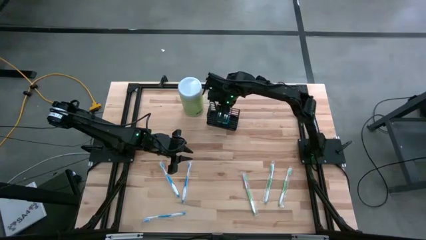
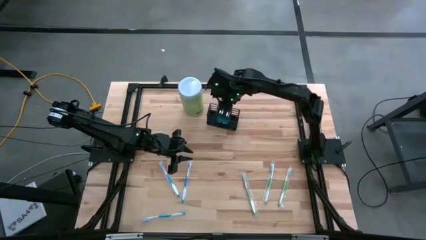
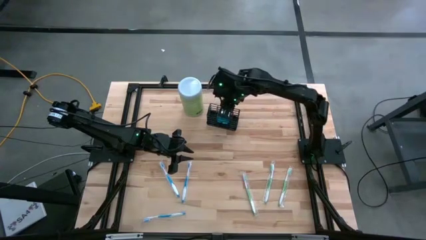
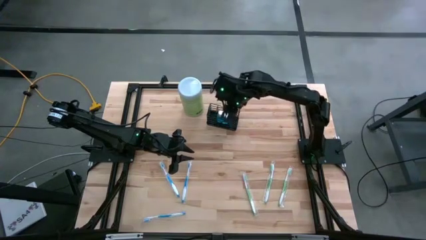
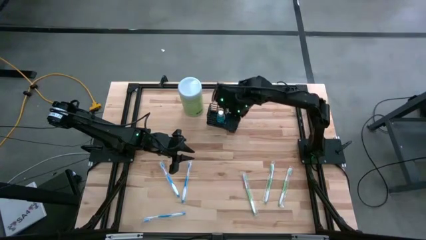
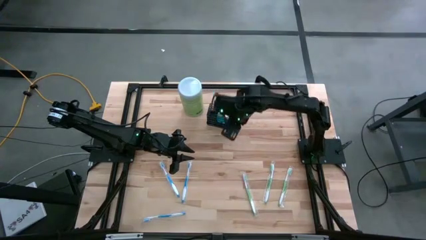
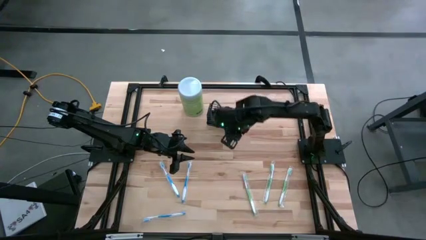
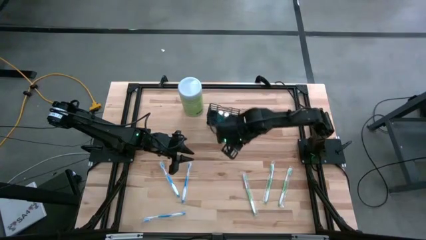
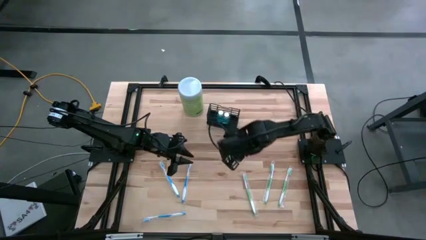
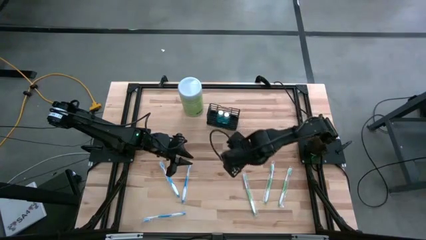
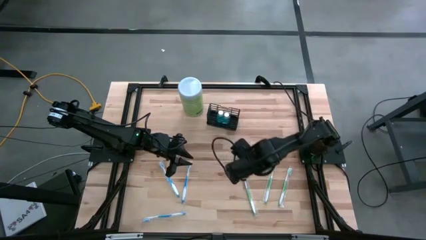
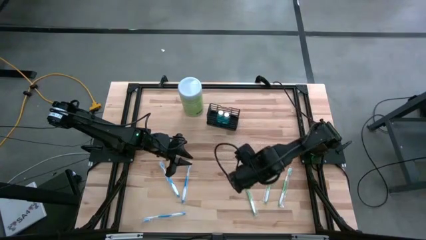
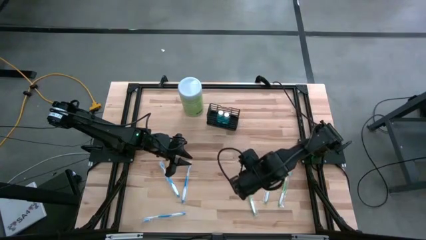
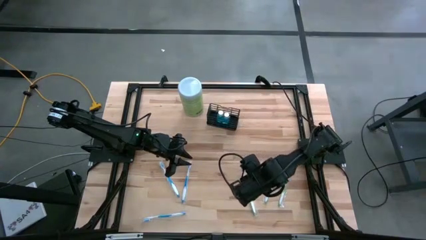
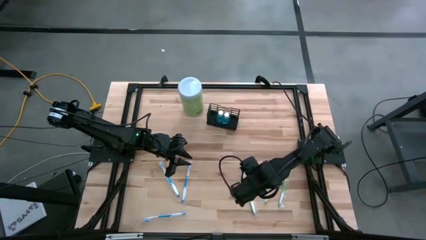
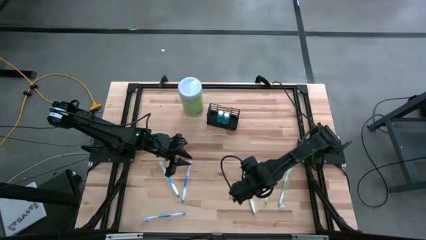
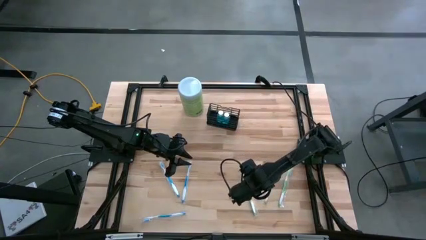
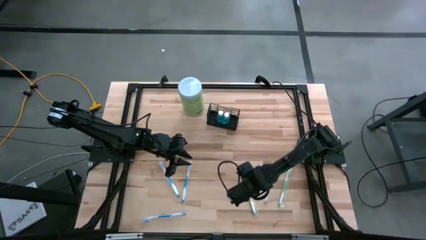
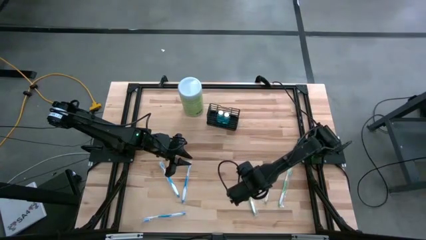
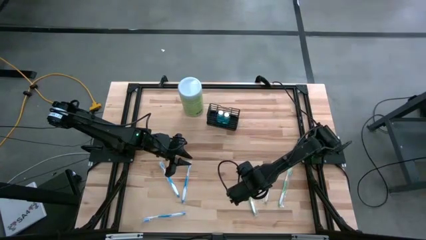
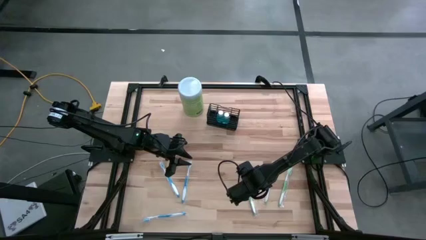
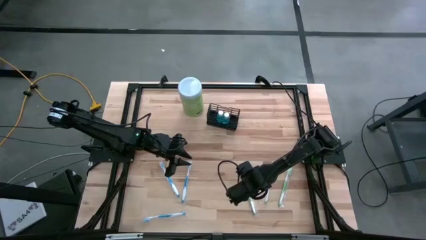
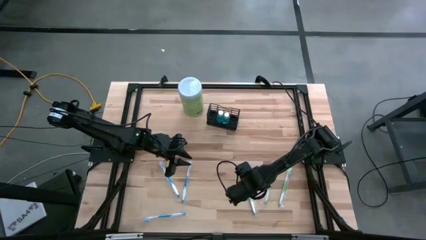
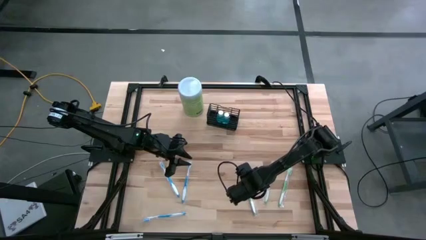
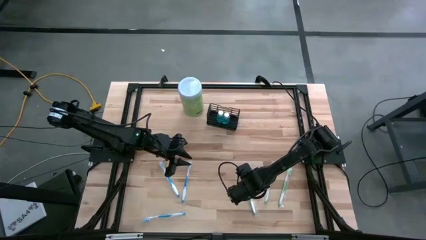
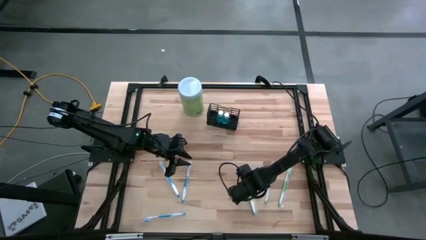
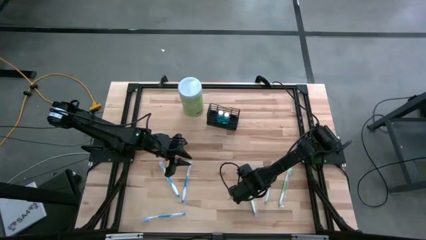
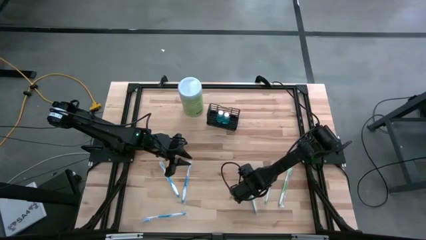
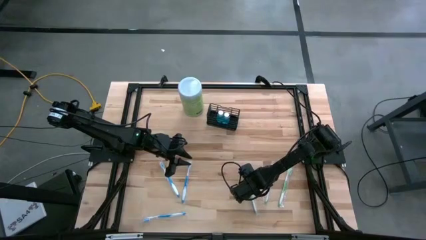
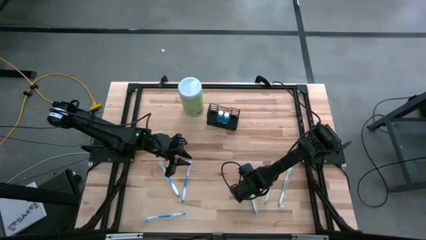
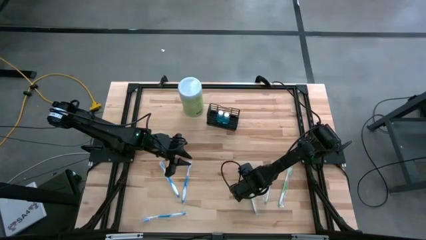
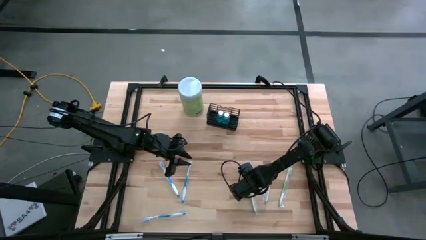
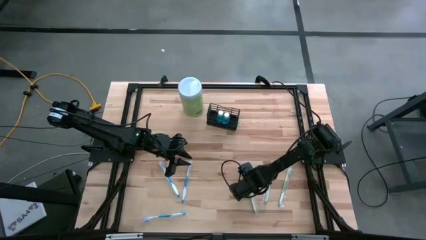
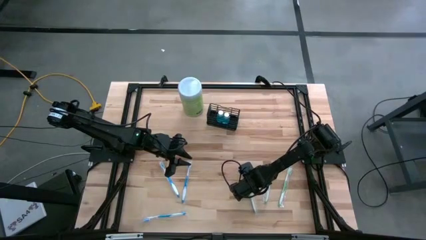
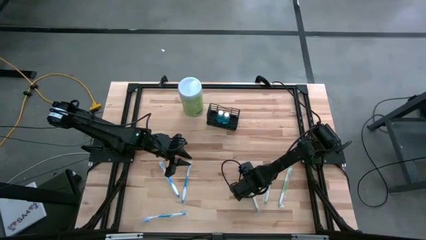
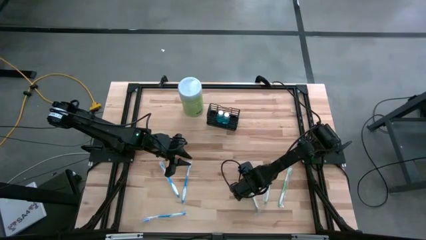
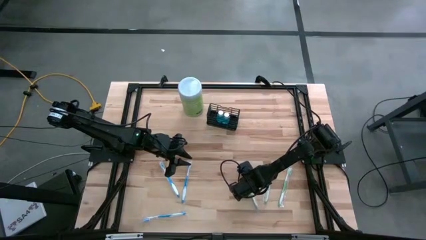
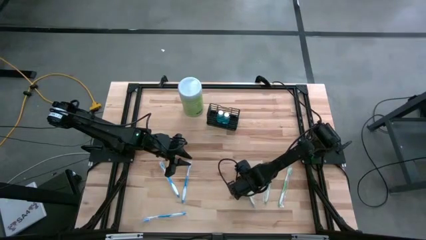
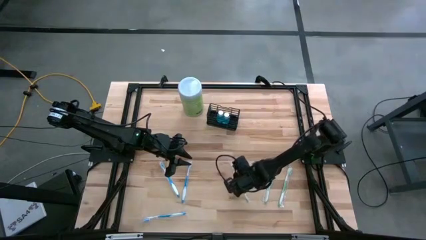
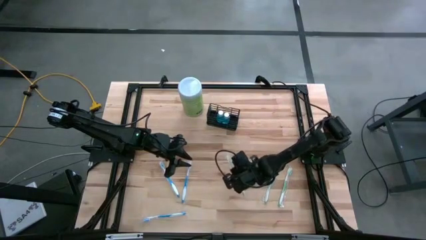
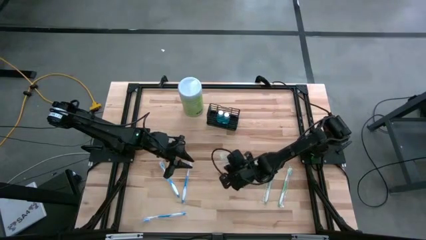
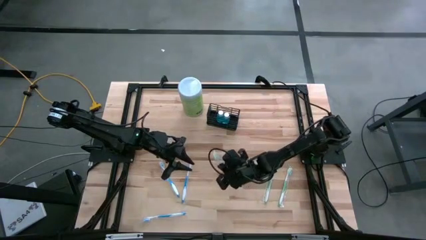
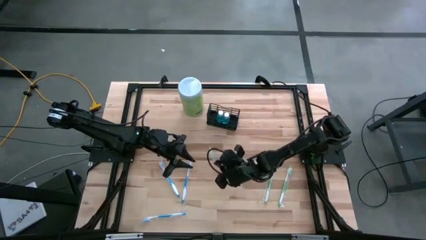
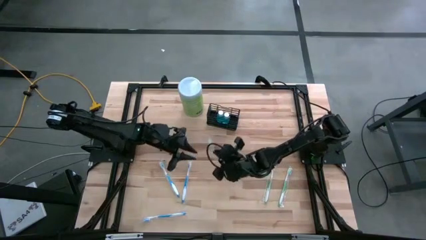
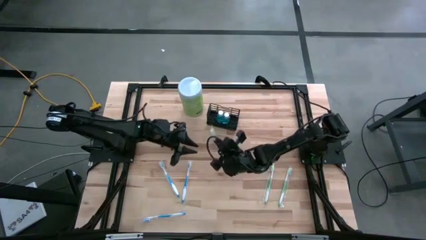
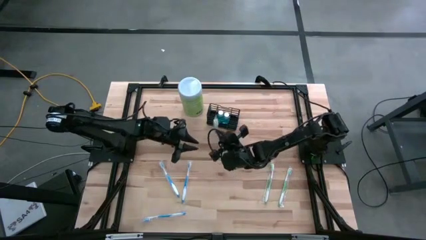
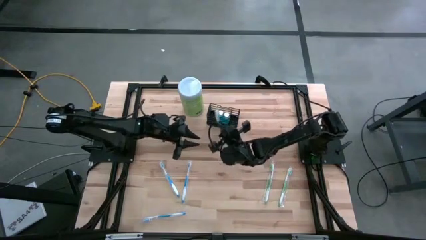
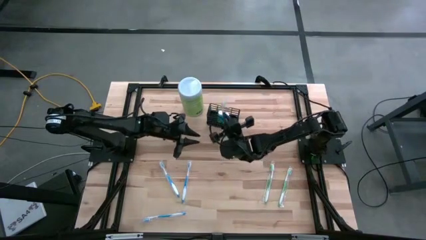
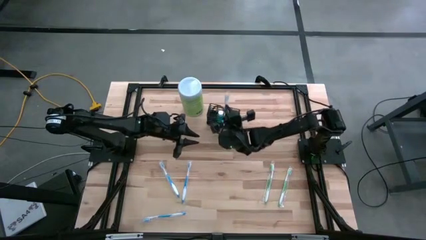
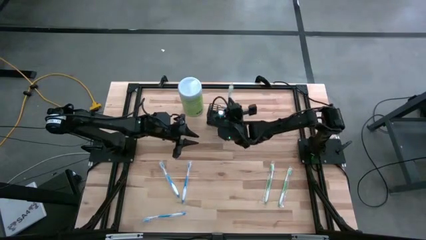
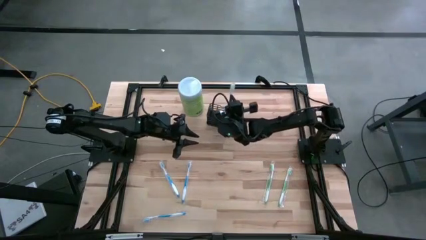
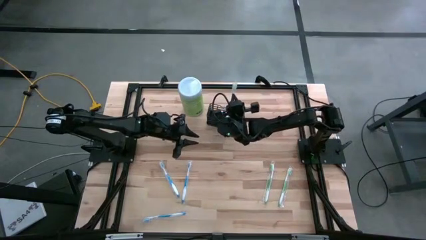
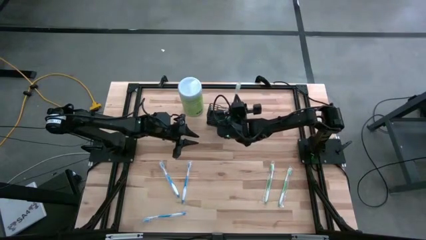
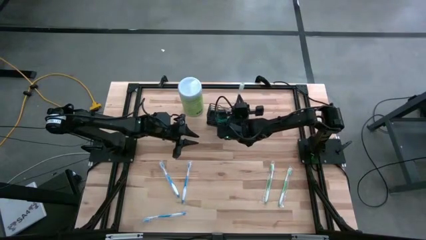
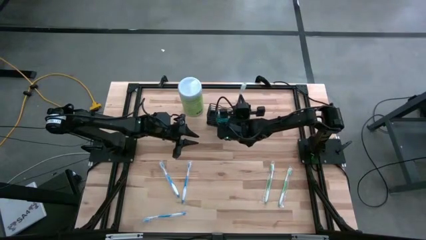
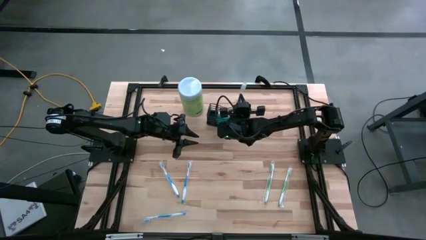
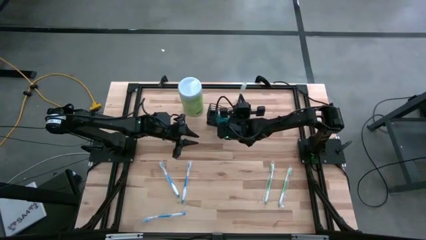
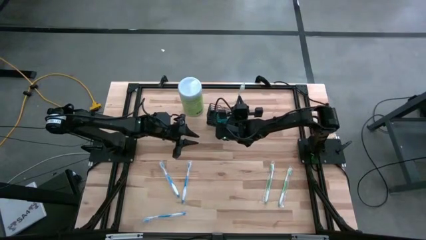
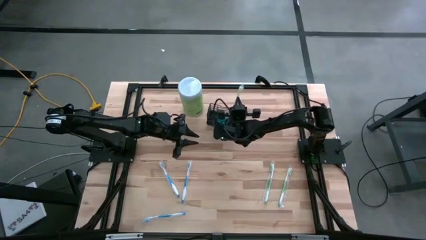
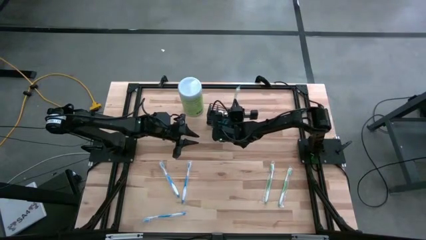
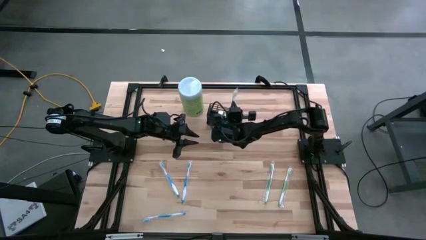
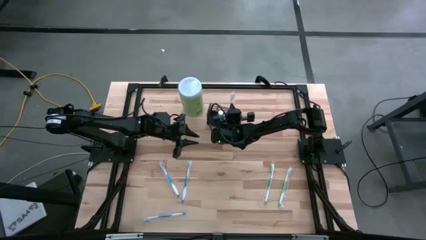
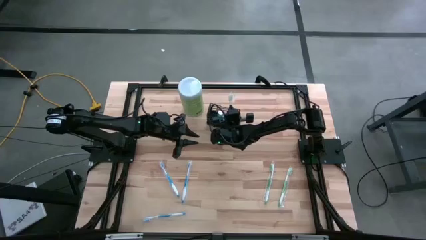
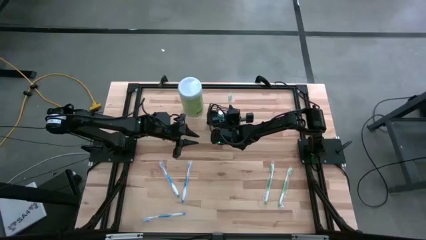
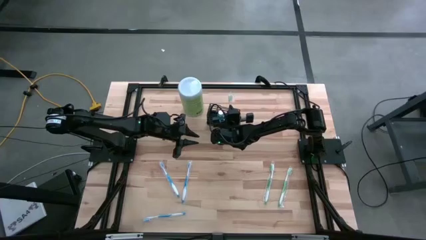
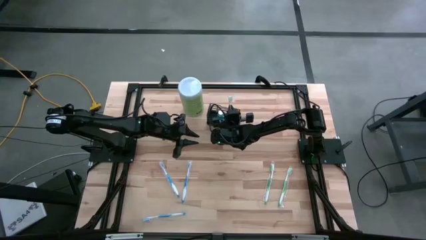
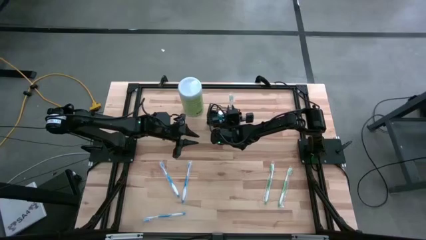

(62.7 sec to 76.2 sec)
Task: Pick & Place toothbrushing station
Put the left green toothbrush into the mesh organizer

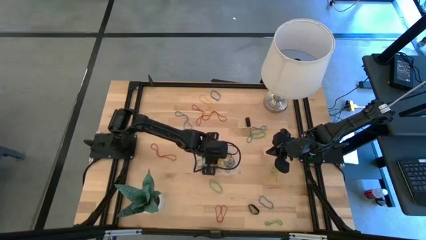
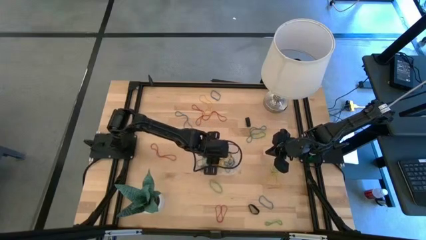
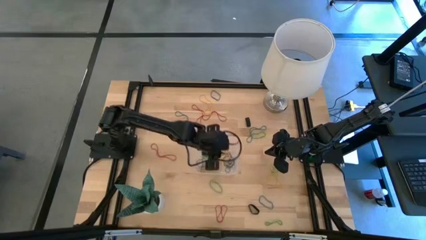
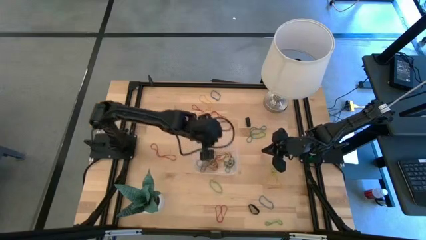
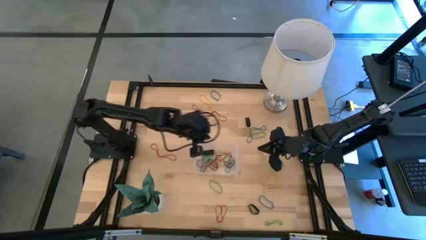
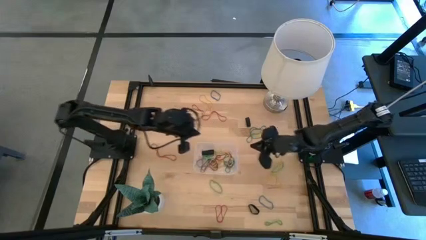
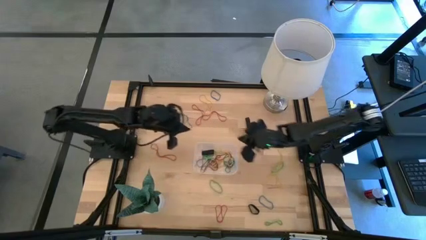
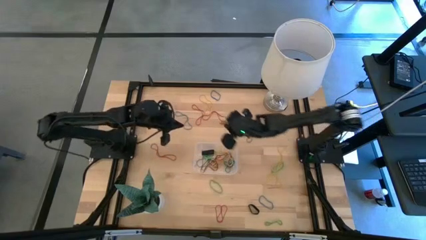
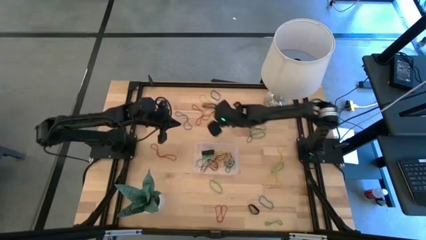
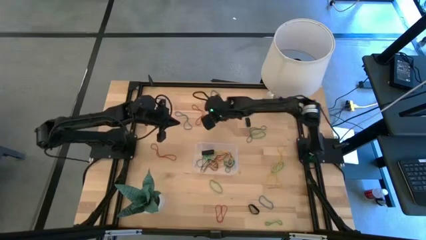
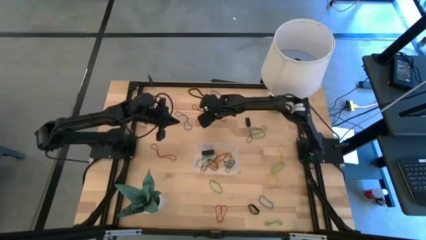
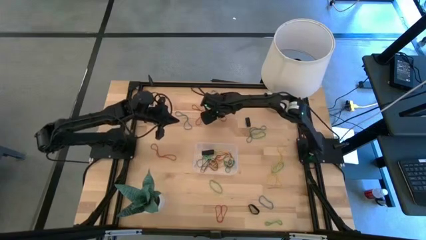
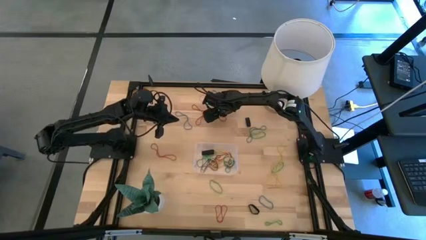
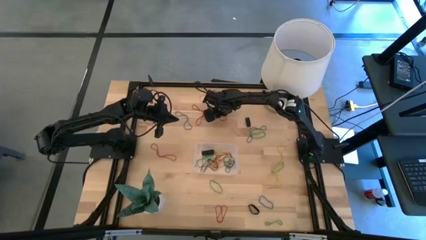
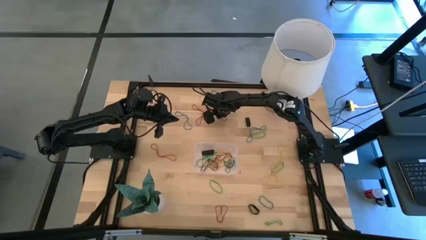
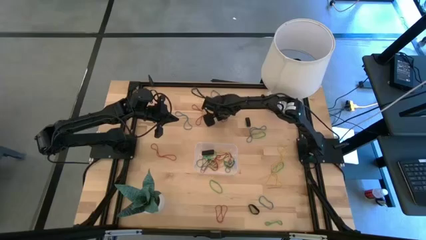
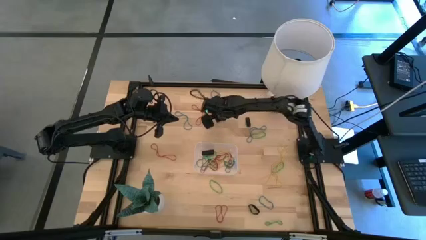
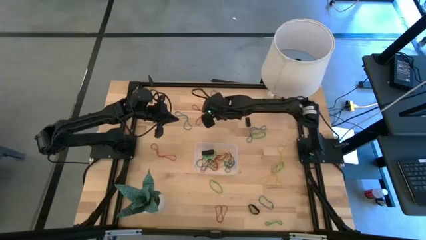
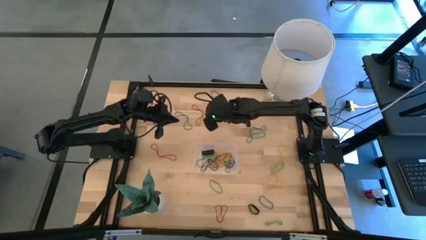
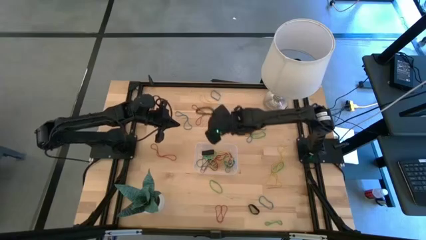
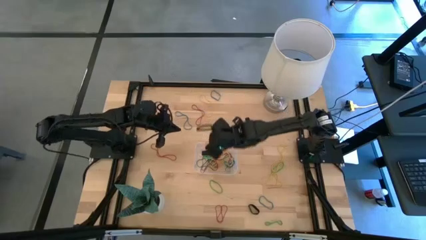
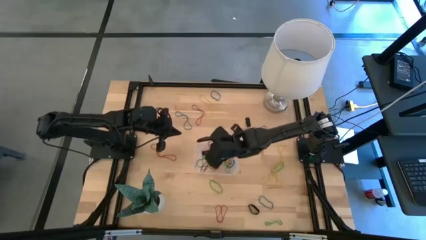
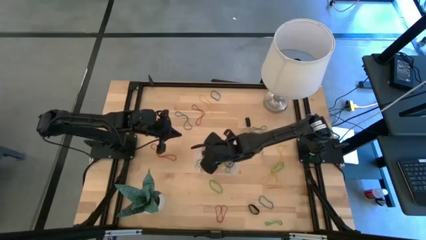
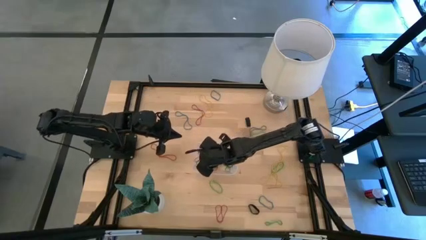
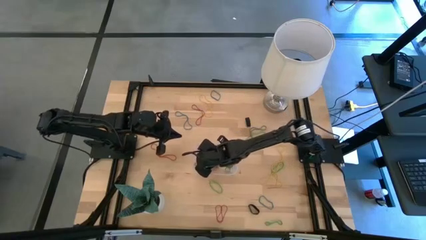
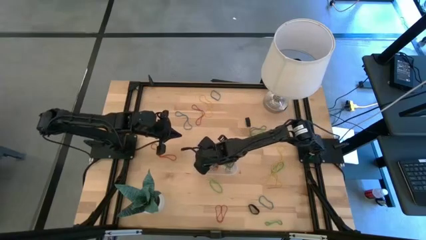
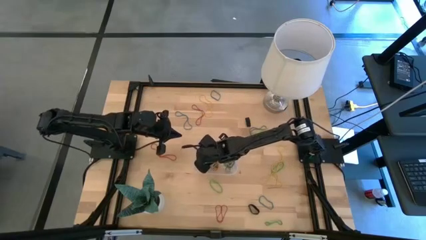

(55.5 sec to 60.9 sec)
Task: Pick and place rubber bands into bin
Put the red rubber band into the transparent bin
